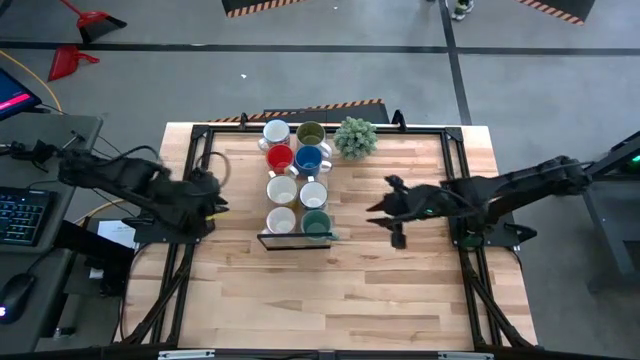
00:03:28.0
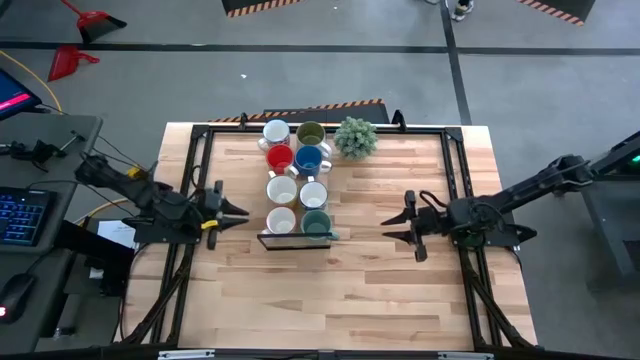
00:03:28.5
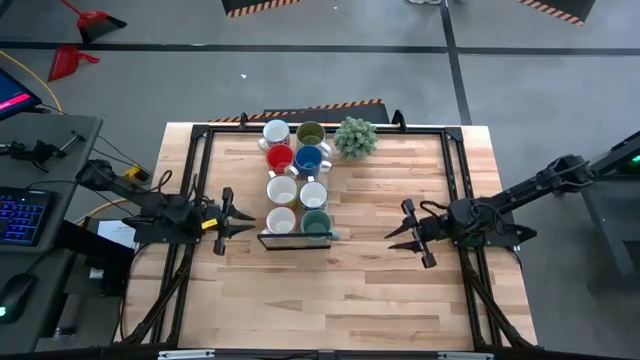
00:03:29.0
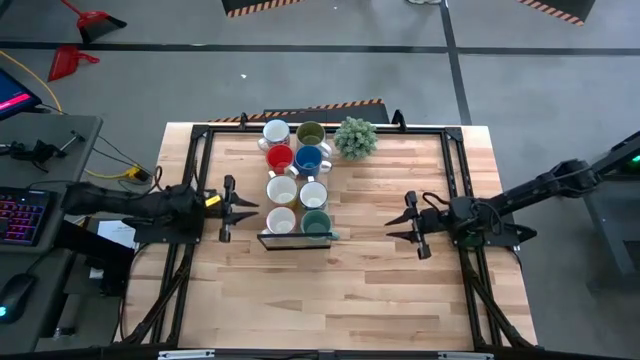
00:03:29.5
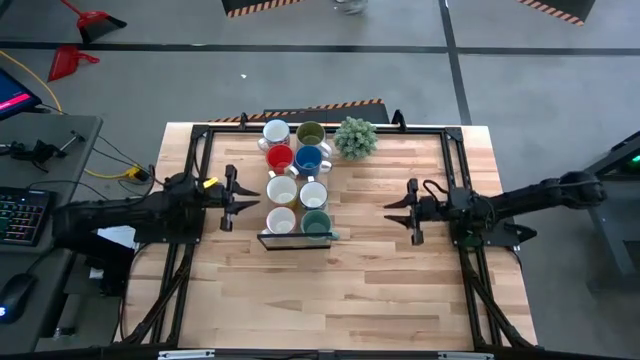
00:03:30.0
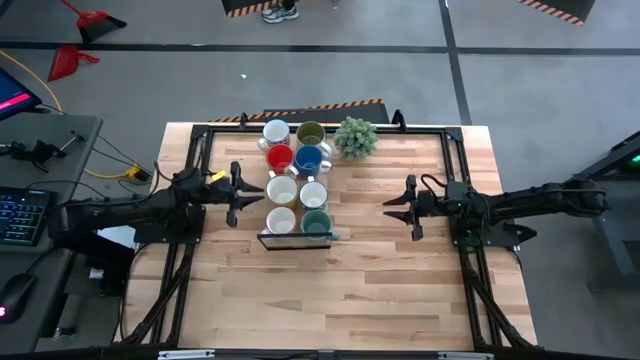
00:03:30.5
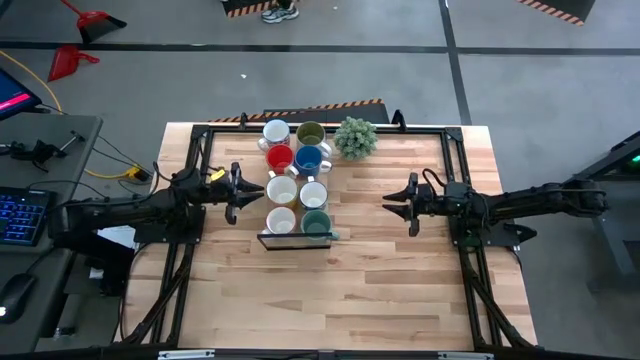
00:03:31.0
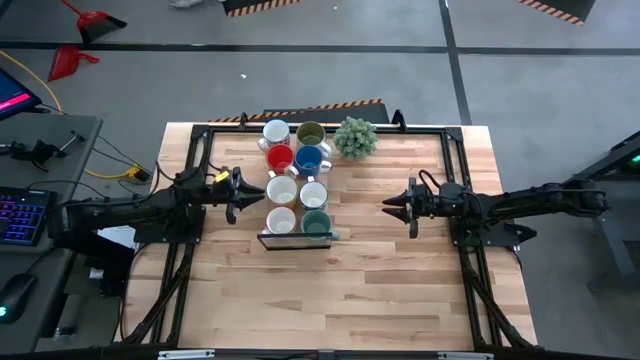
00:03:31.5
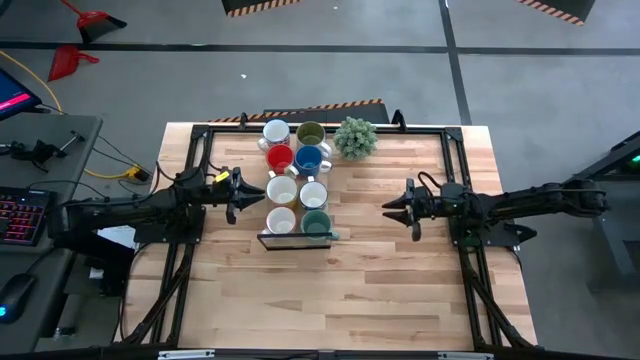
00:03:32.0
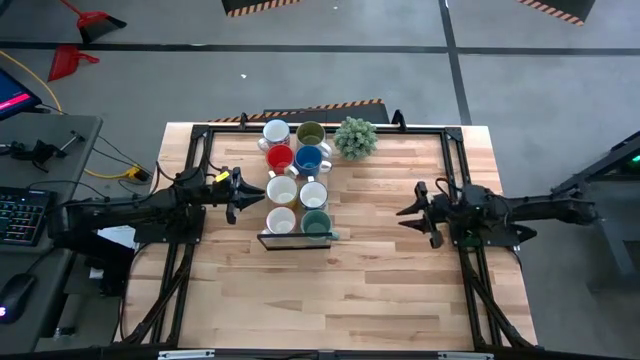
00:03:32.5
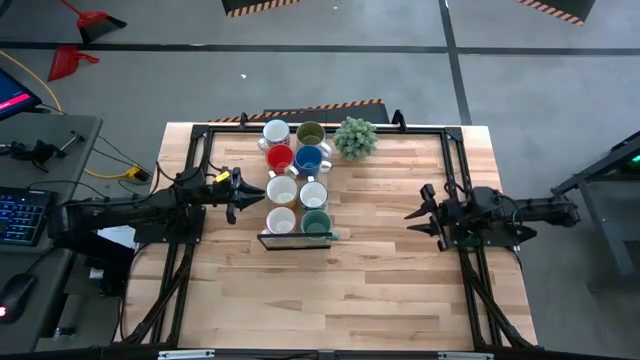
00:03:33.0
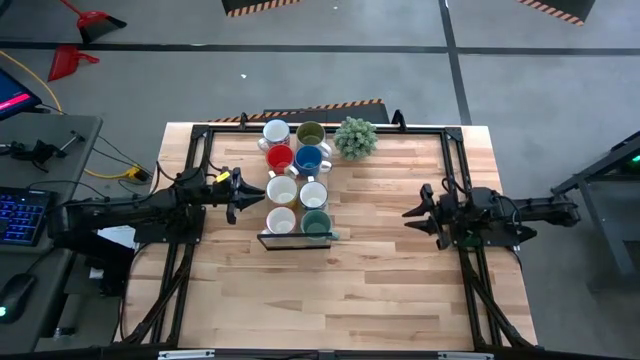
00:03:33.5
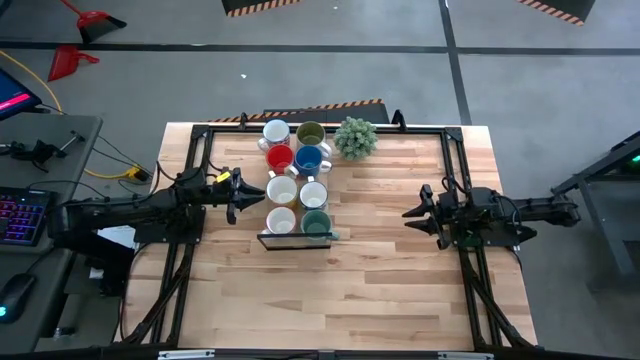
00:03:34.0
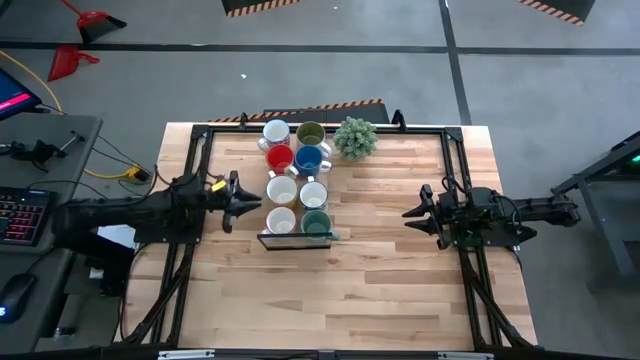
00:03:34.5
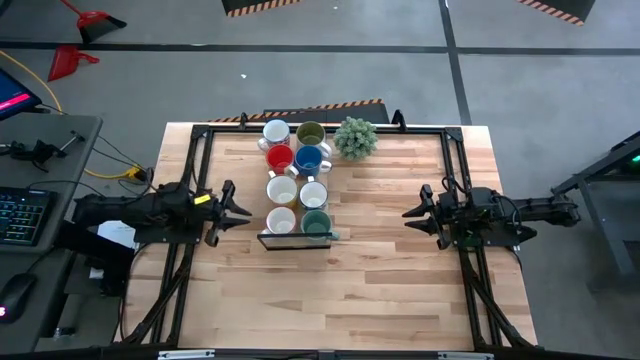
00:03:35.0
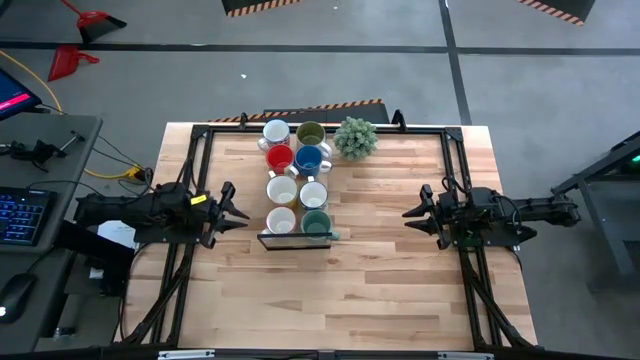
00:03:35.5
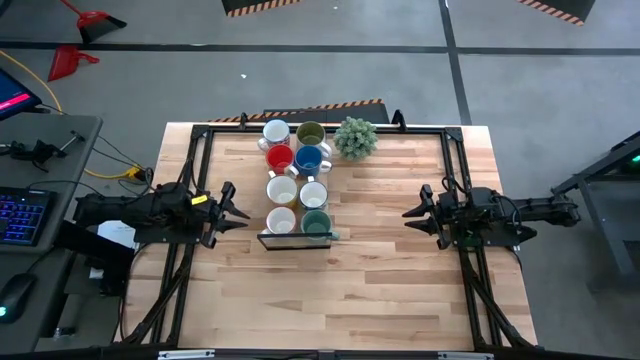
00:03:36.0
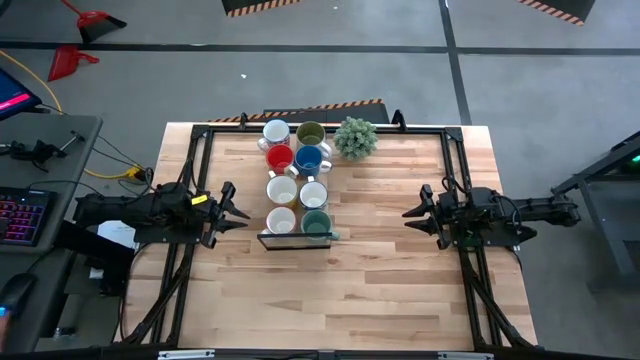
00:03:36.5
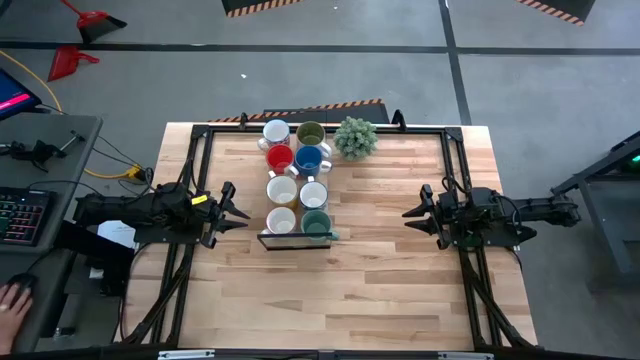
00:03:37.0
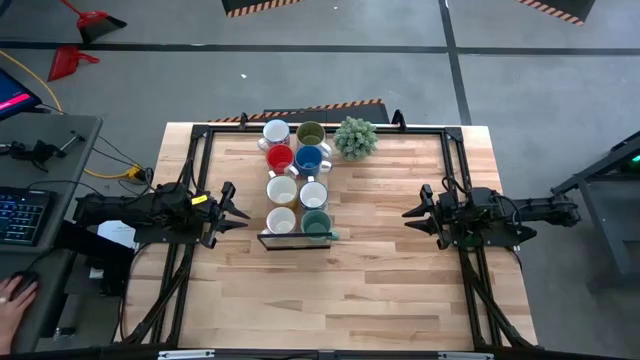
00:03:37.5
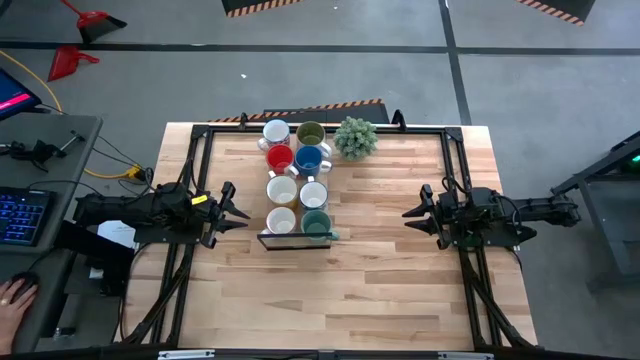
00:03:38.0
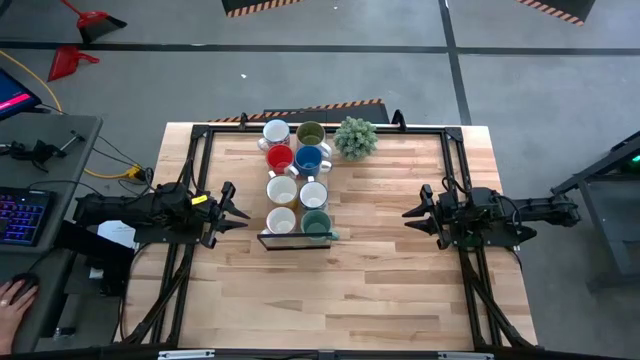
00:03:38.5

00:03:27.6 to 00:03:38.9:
Task: Place coffee mugs
Return to Home Position

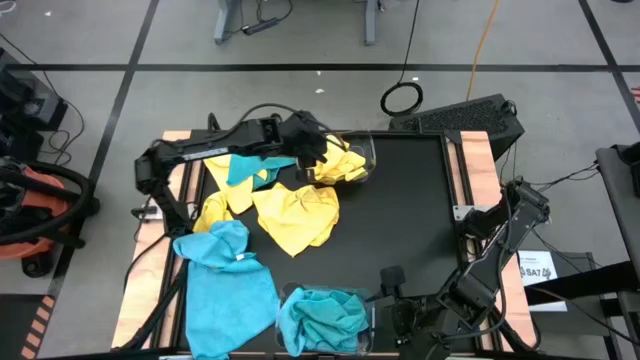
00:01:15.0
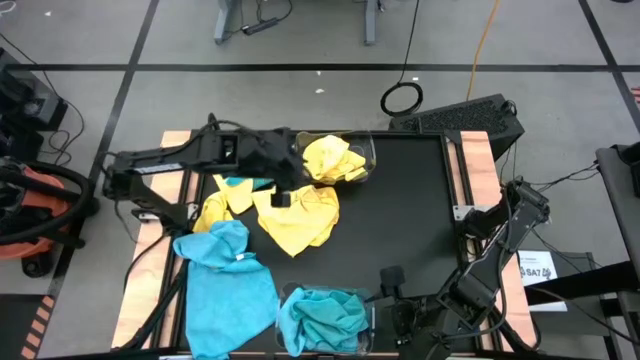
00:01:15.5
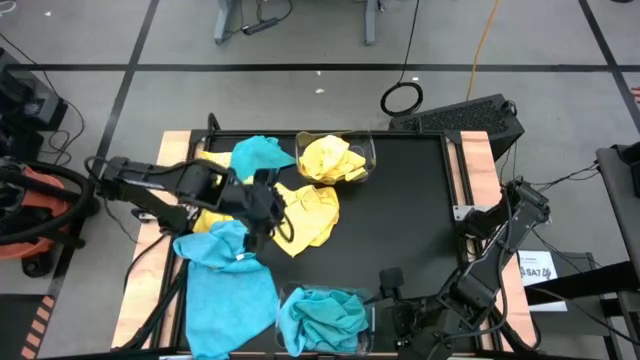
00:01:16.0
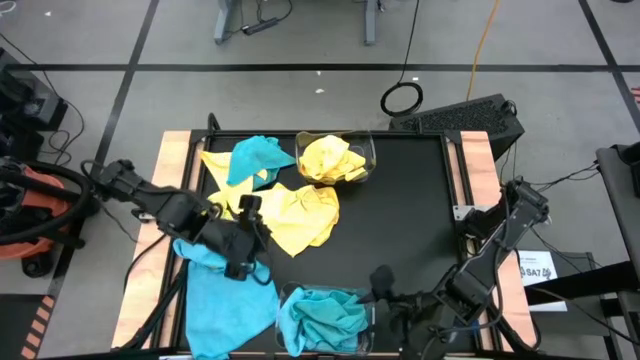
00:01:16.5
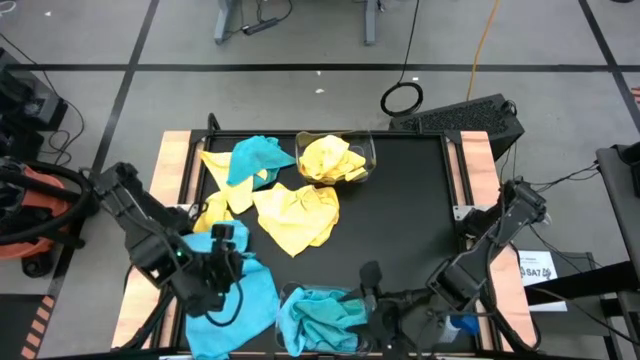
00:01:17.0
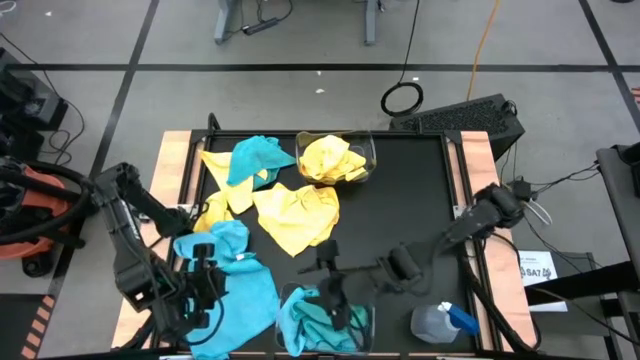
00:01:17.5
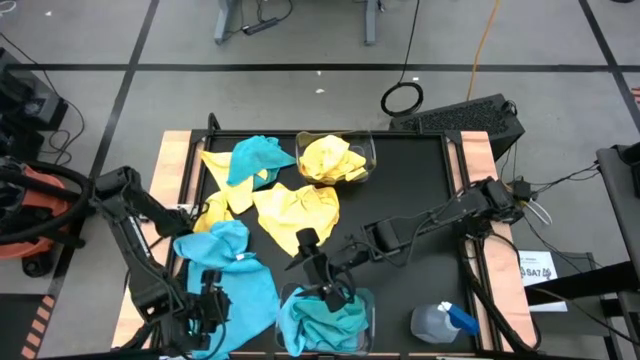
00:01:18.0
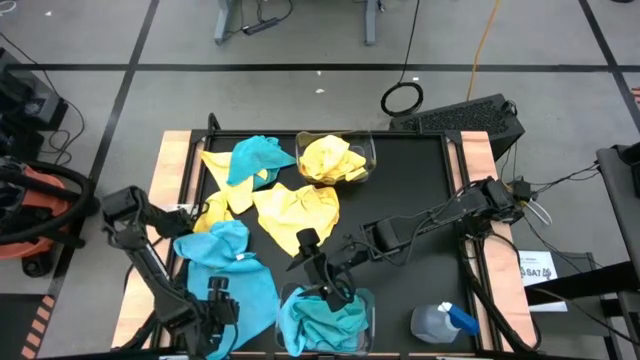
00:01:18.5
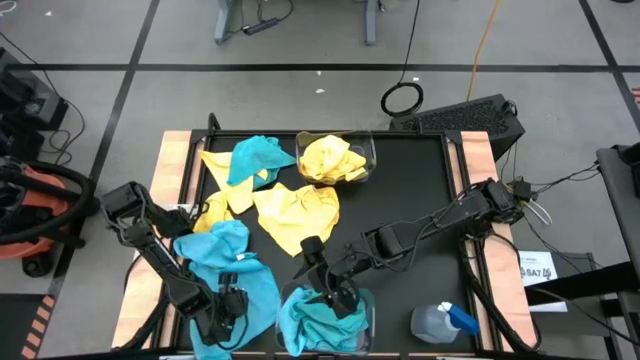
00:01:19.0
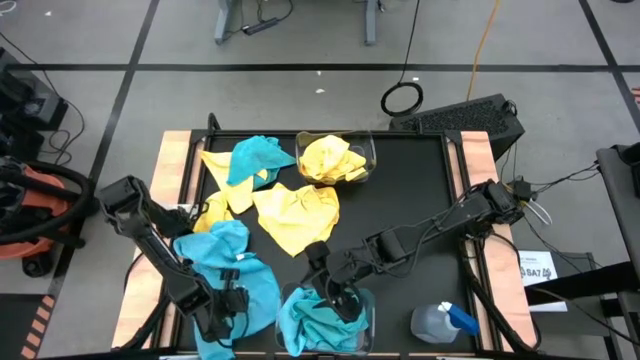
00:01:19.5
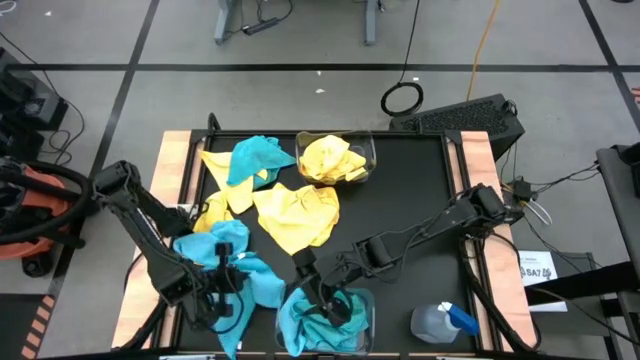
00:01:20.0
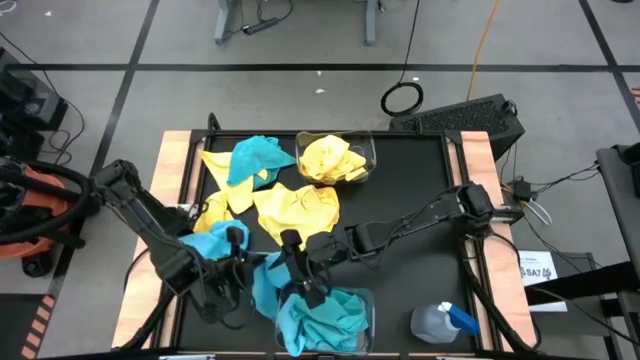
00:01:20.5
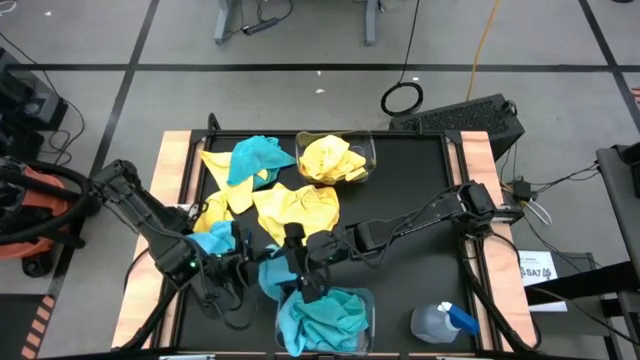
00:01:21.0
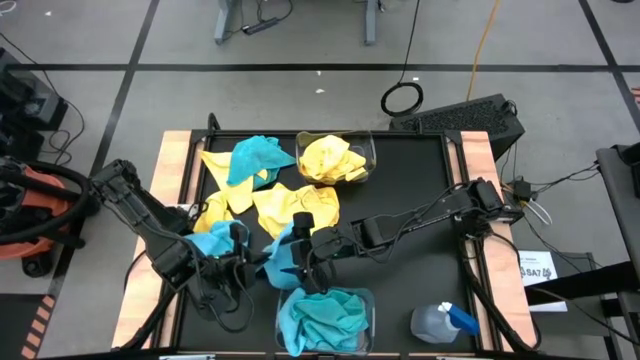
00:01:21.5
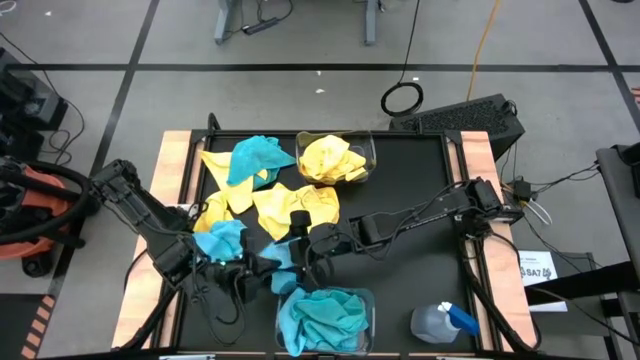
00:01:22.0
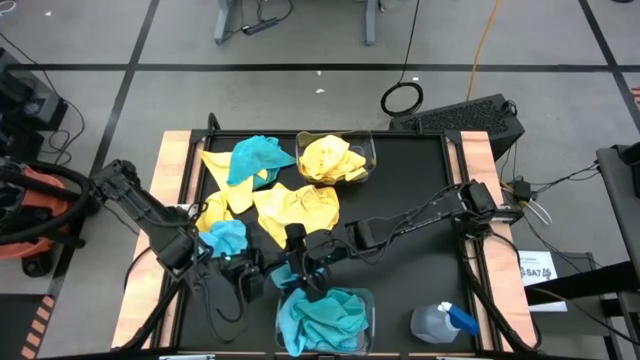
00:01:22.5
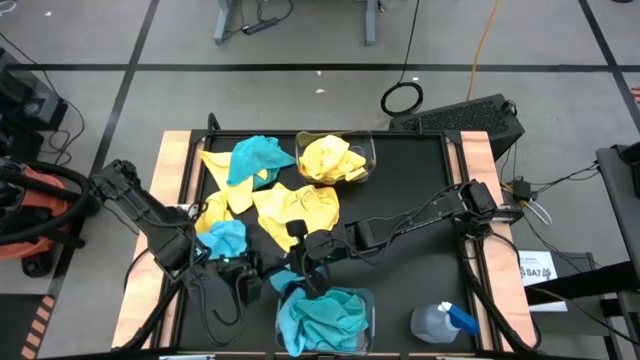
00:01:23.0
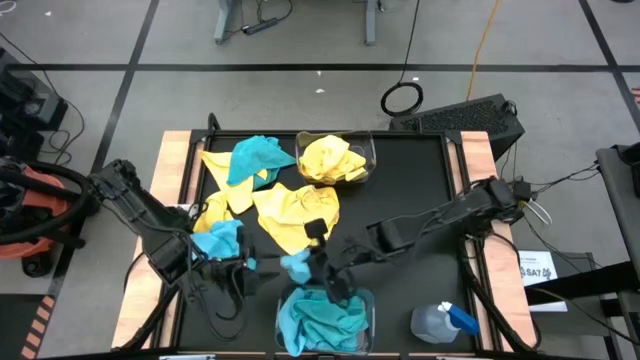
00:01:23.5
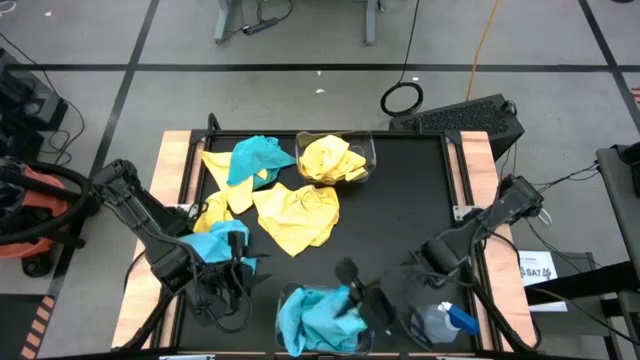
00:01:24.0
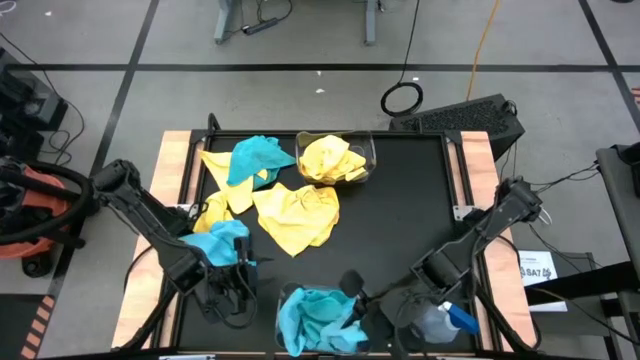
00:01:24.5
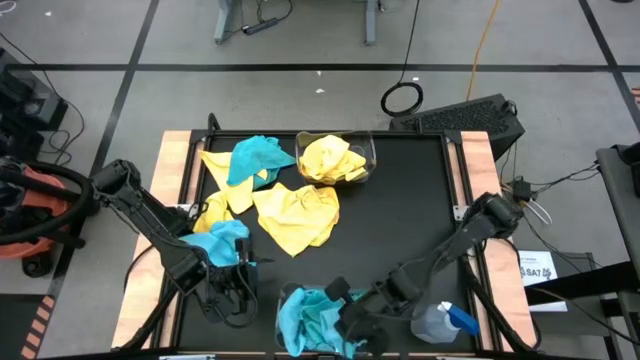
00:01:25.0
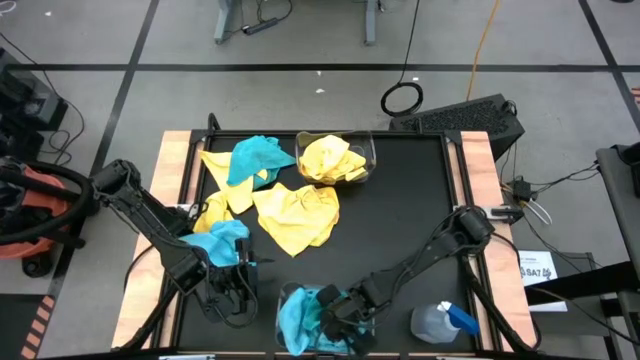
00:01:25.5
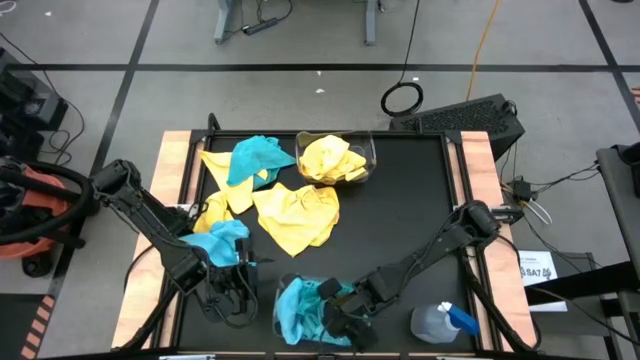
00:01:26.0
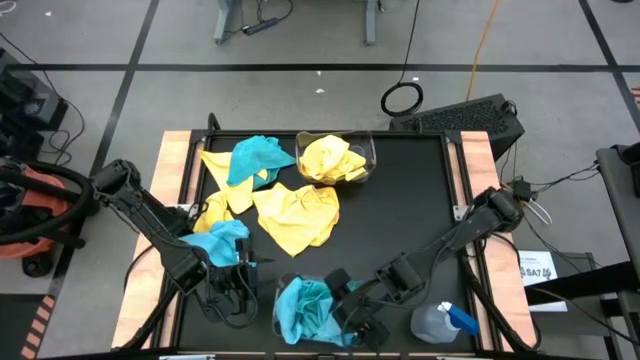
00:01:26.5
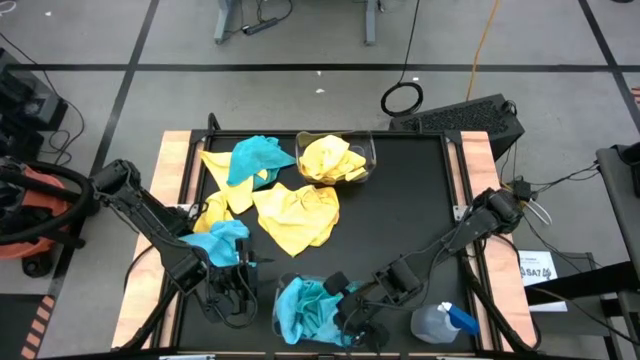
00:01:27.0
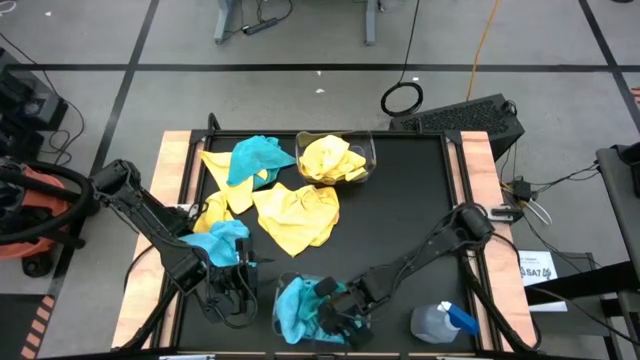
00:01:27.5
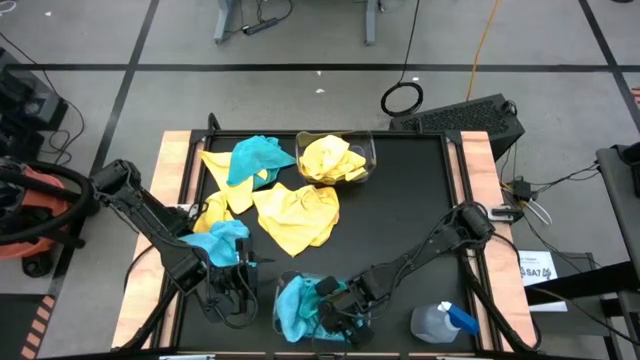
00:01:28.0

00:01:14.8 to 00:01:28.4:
Task: Sort microfiber towel by color & place in baskets
Put the blue towel into the bottom transparent bin
